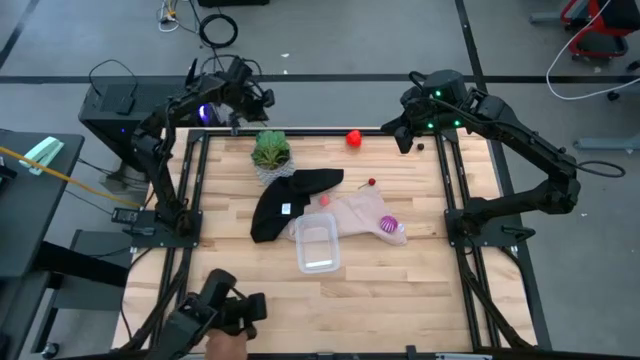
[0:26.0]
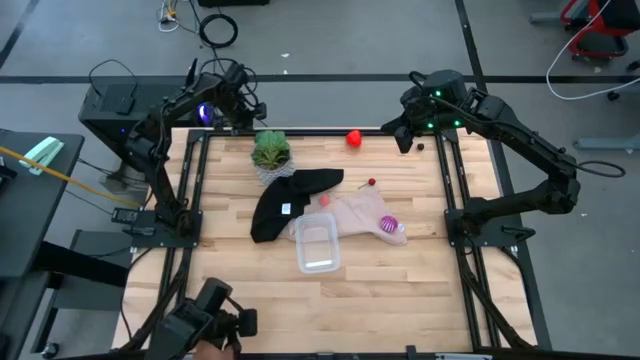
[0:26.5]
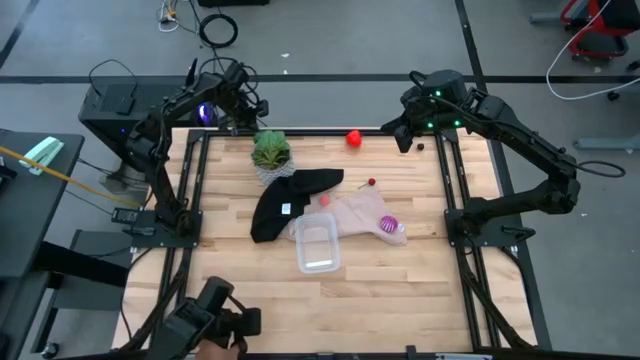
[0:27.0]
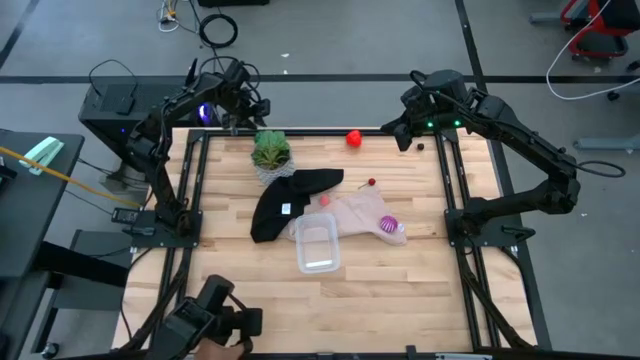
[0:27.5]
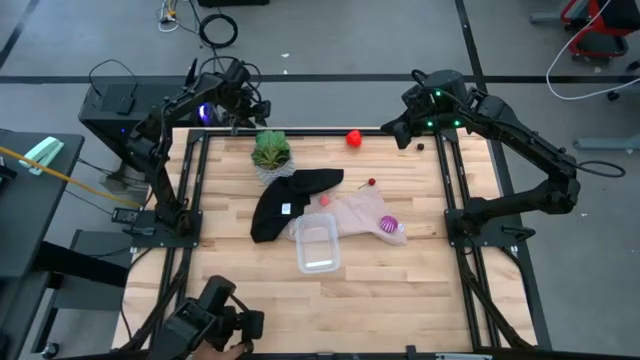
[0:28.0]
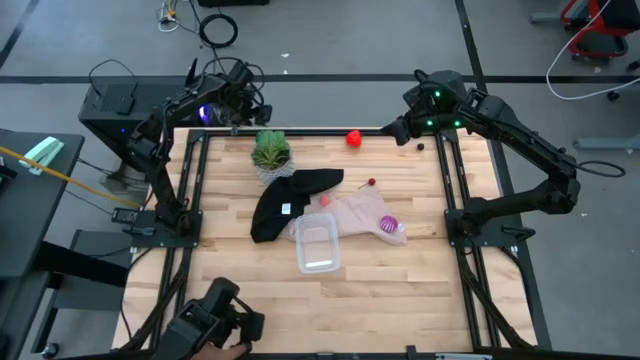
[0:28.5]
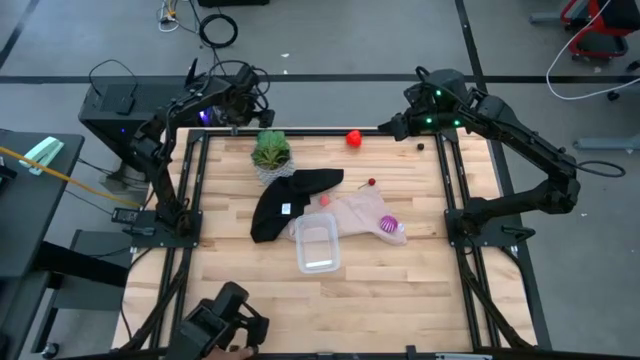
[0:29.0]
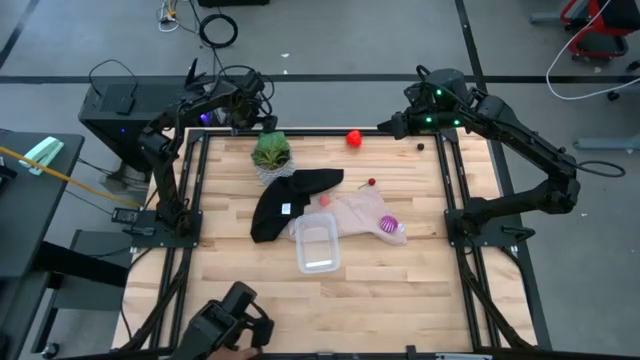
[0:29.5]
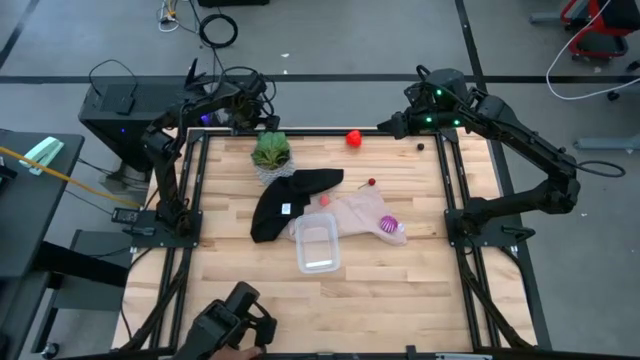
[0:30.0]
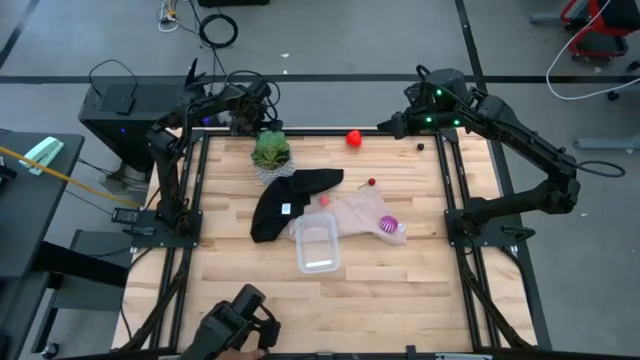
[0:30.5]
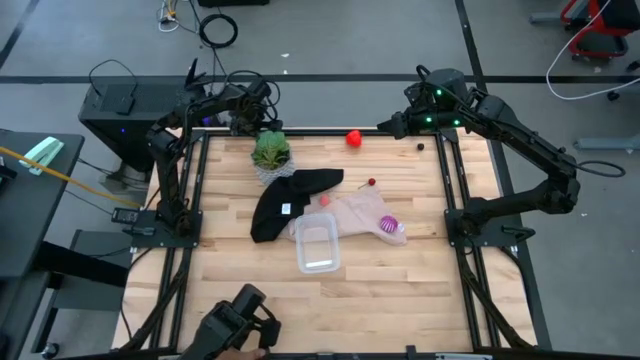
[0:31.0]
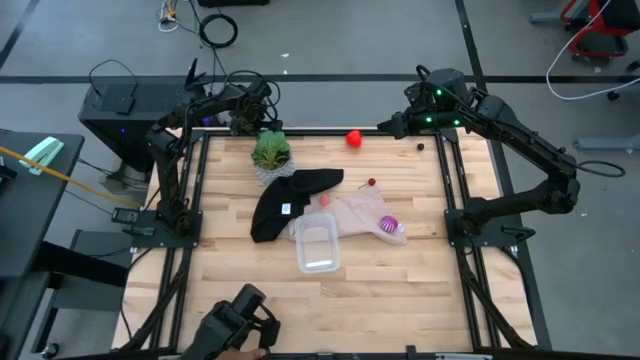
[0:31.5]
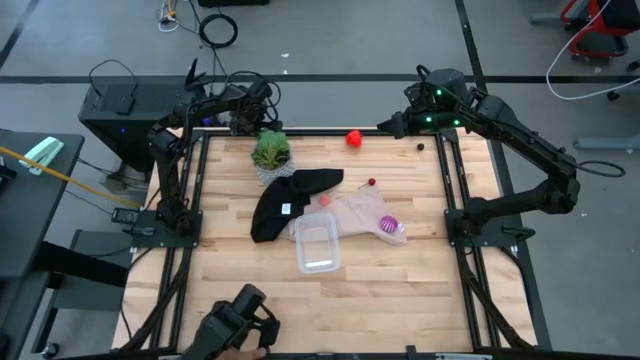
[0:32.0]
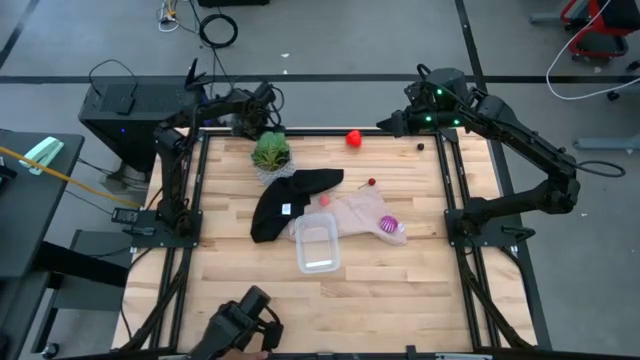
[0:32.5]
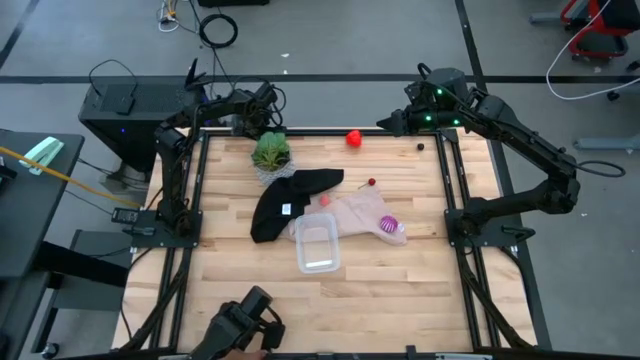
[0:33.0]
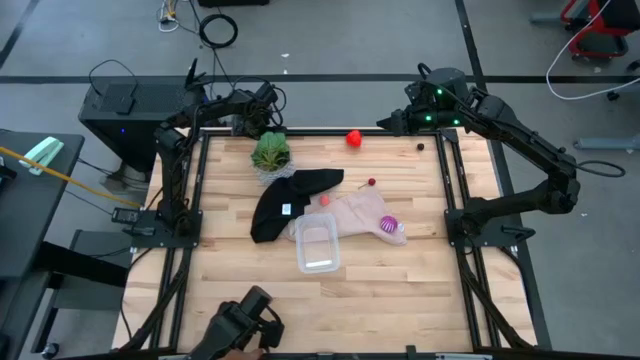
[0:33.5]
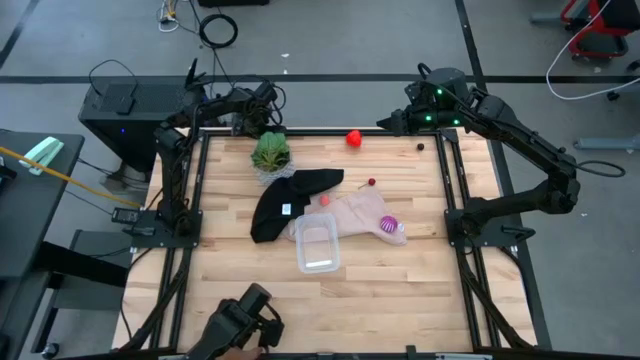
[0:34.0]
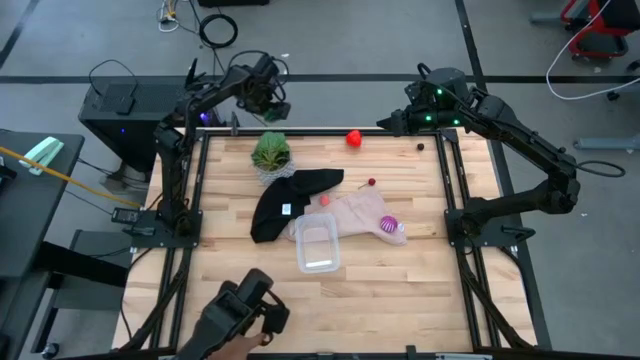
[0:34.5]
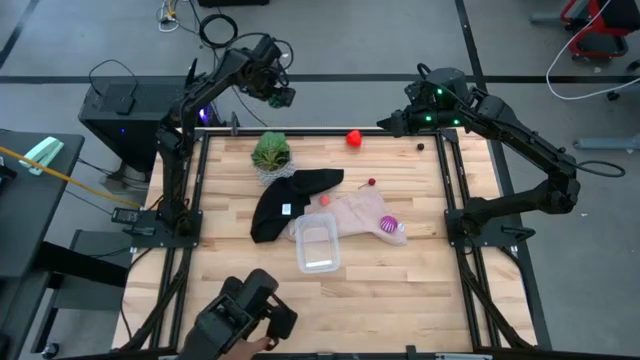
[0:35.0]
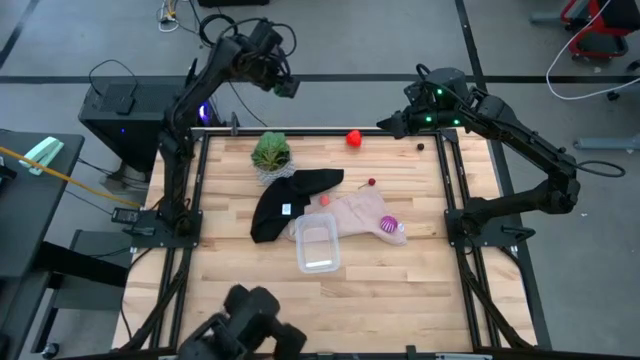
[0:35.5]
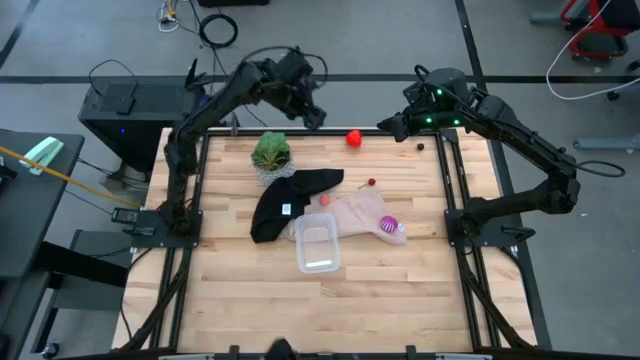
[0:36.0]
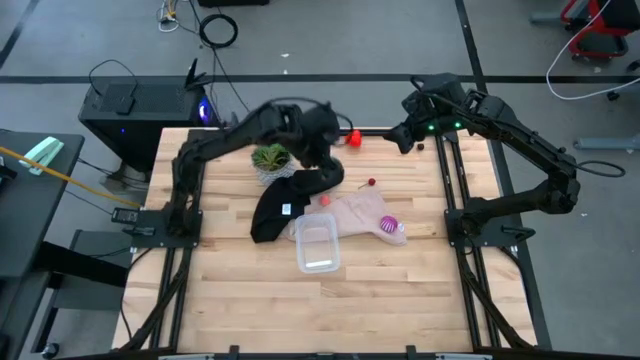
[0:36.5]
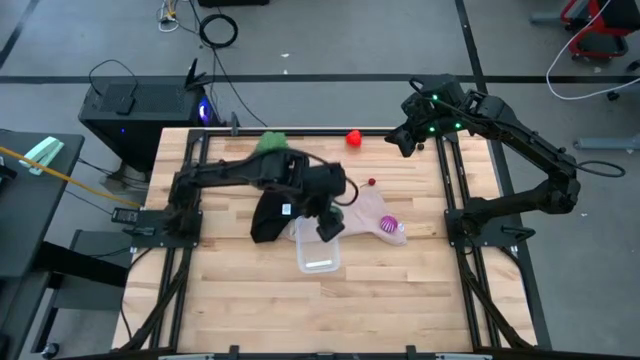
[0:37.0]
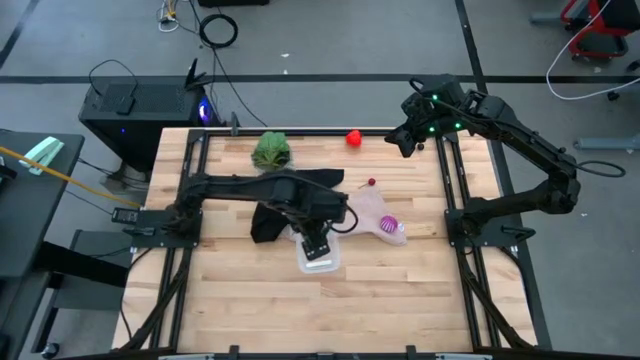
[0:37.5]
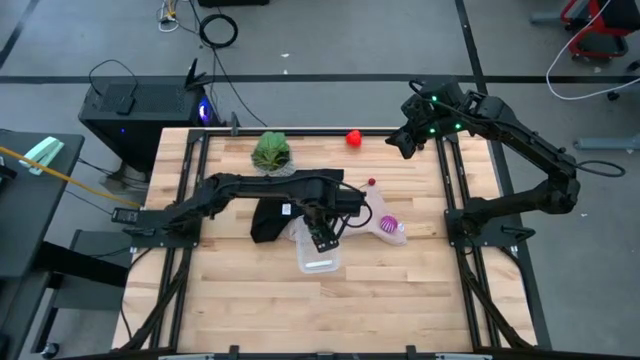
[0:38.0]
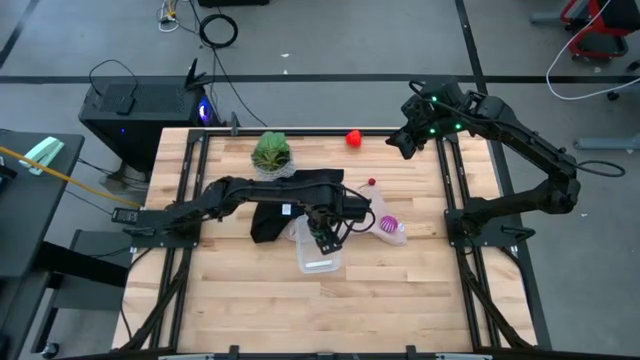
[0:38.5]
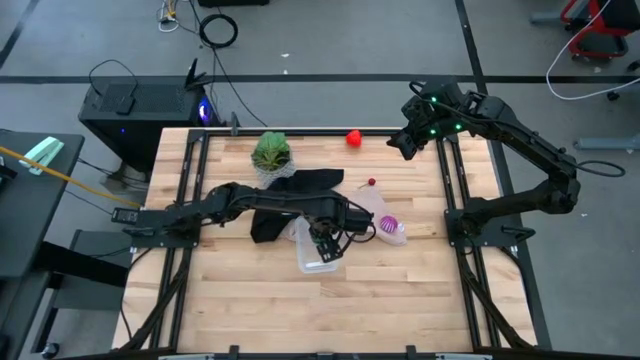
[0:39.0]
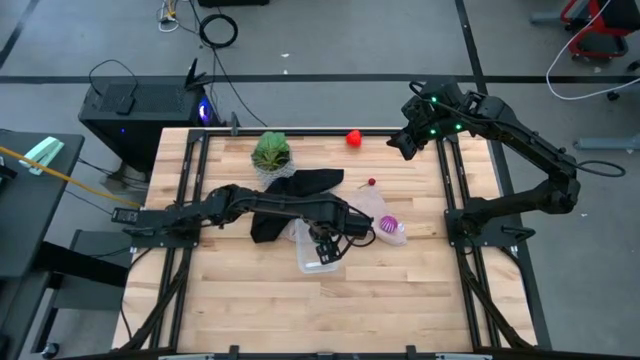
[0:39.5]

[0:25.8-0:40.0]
Task: Pick and placing Produce into tupperware
Put the watermelon into the transparent container

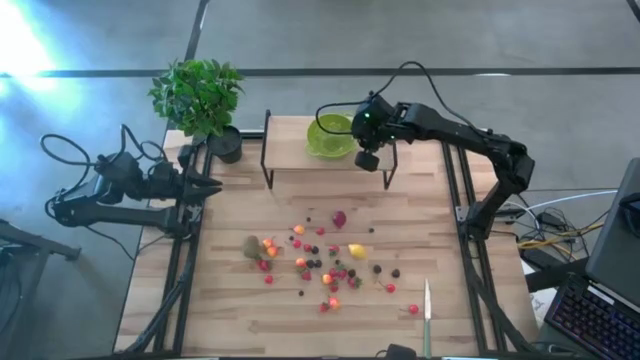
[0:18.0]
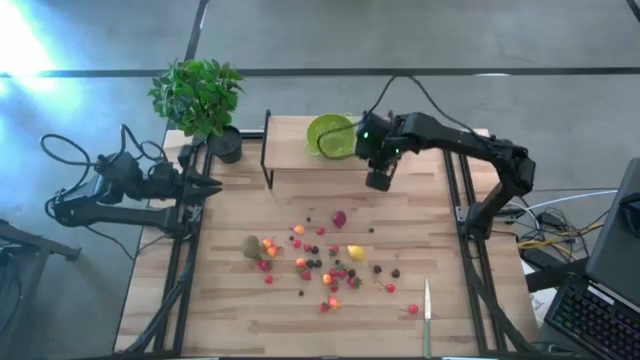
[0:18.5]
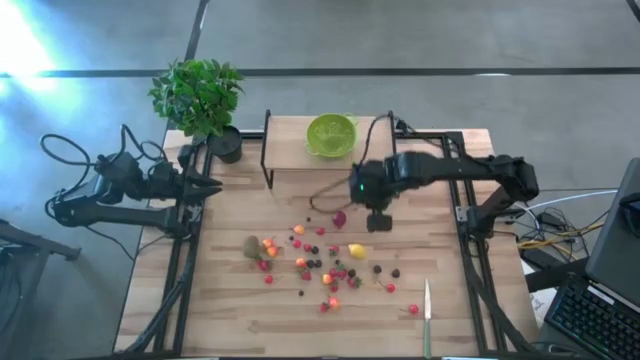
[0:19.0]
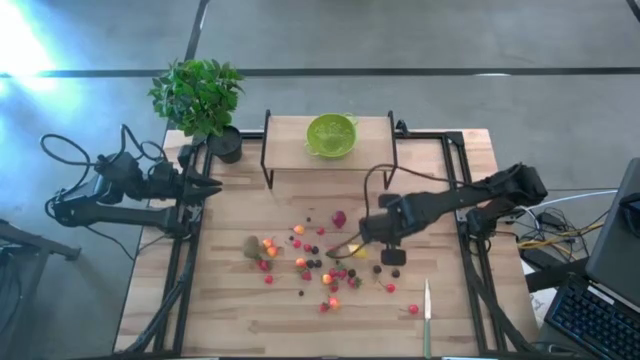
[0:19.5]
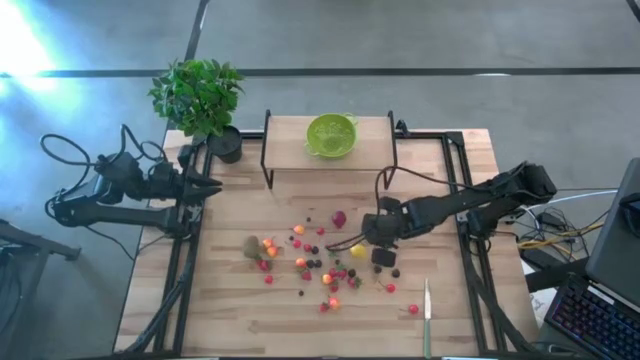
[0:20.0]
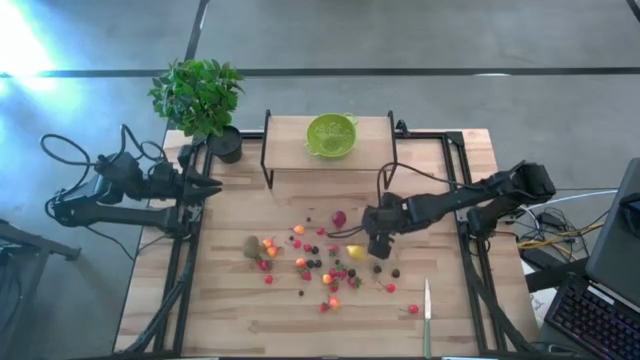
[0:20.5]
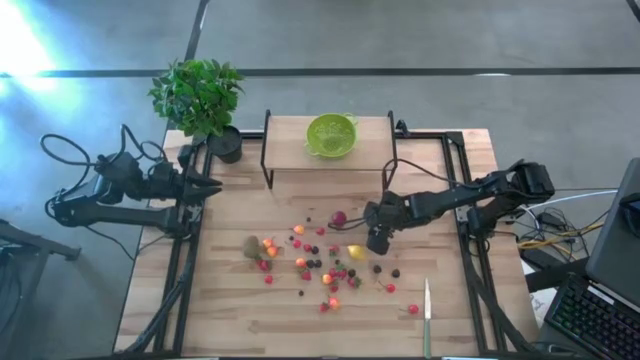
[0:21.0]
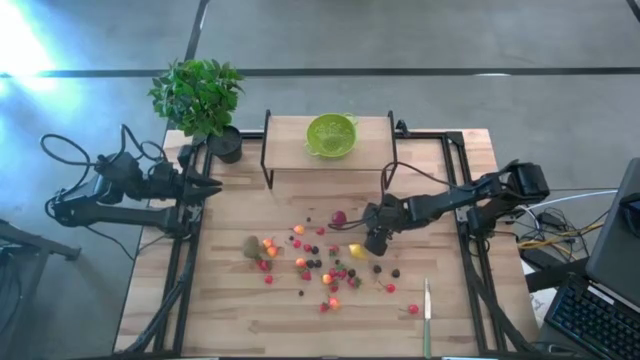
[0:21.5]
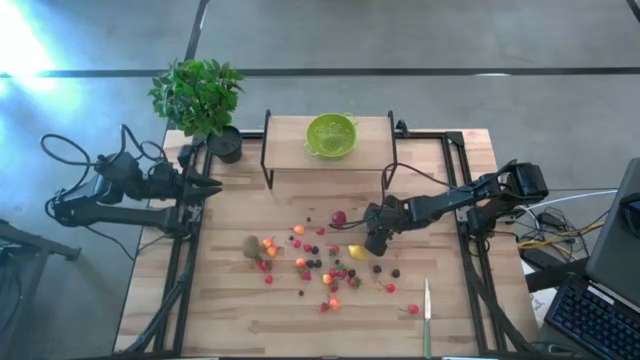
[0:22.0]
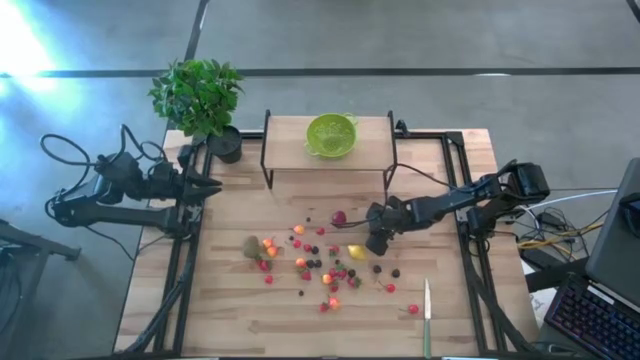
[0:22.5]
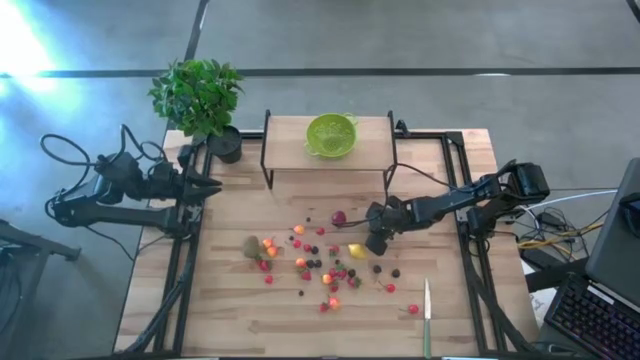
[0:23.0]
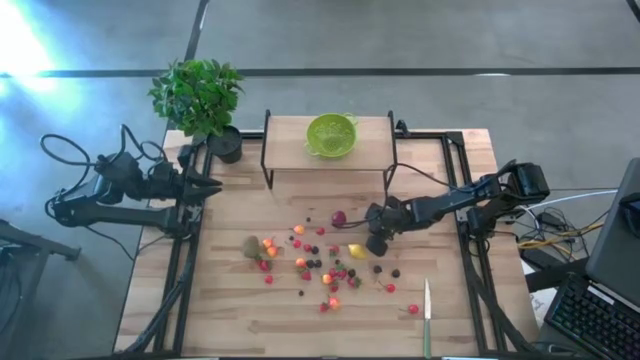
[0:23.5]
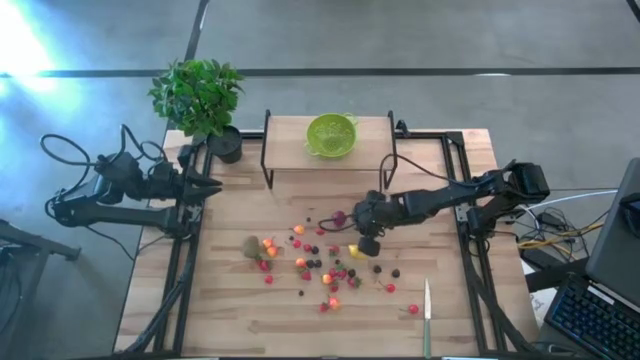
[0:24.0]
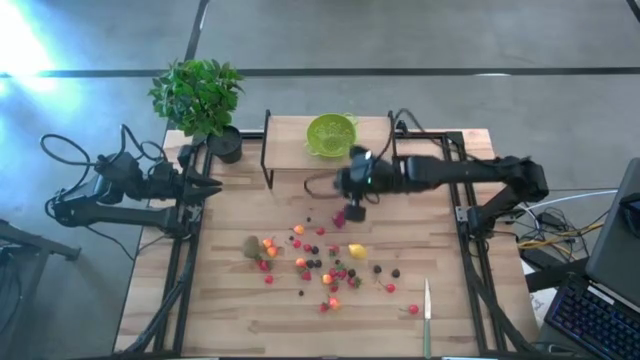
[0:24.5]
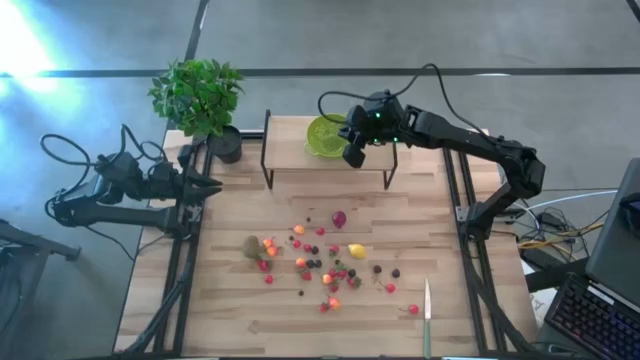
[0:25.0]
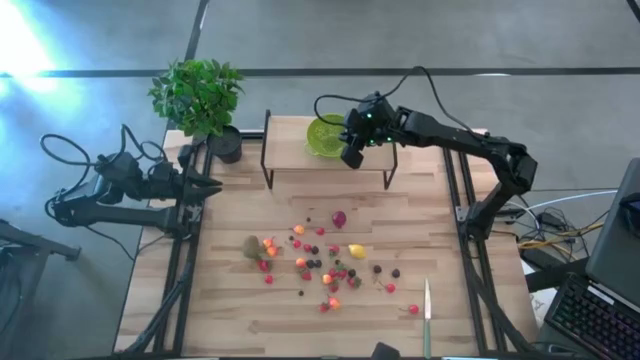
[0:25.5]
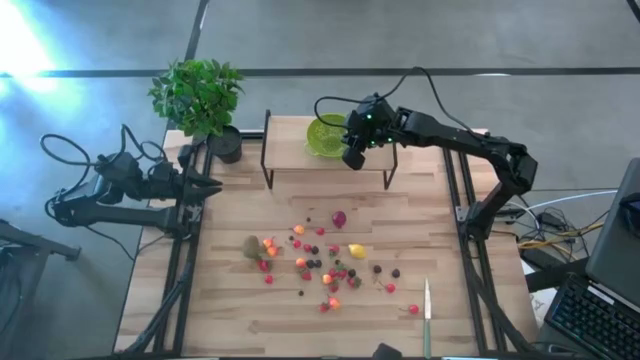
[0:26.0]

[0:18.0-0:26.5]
Task: Pick & Place Fruit
Put the blueberry into the green strainer bowl on the shelf
